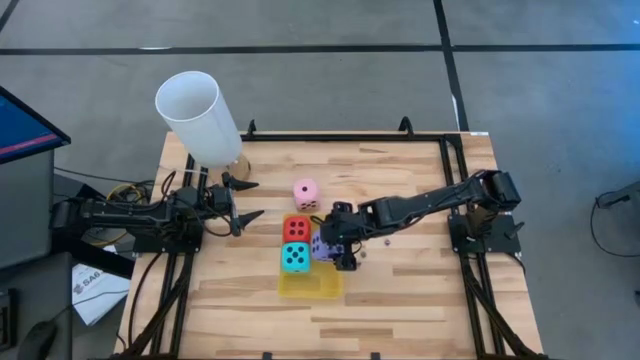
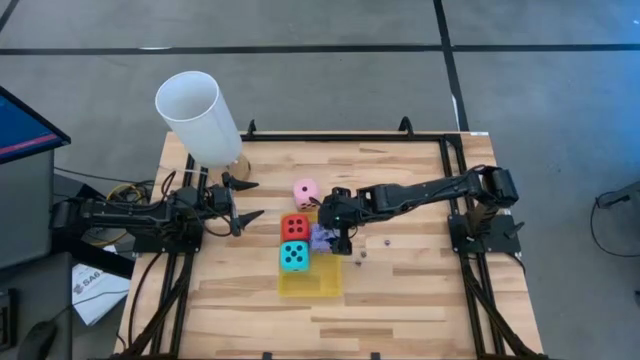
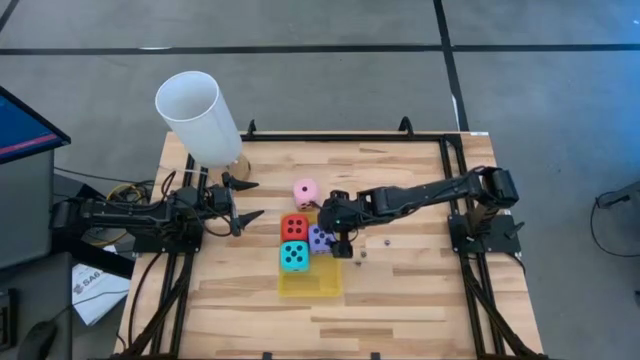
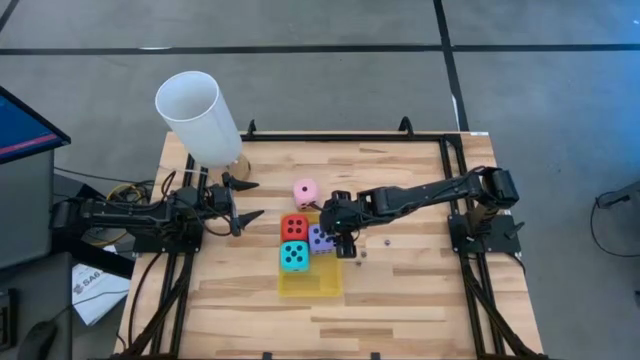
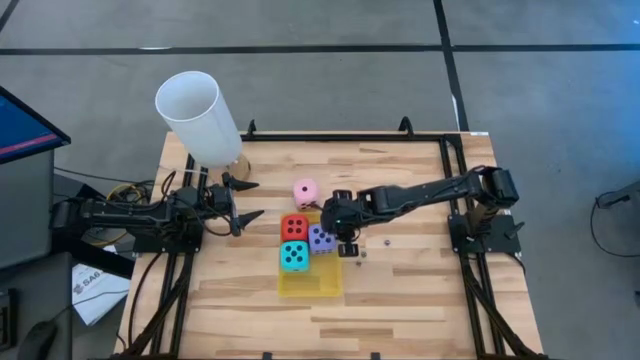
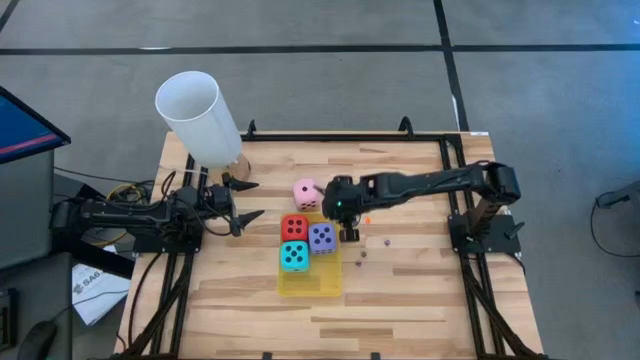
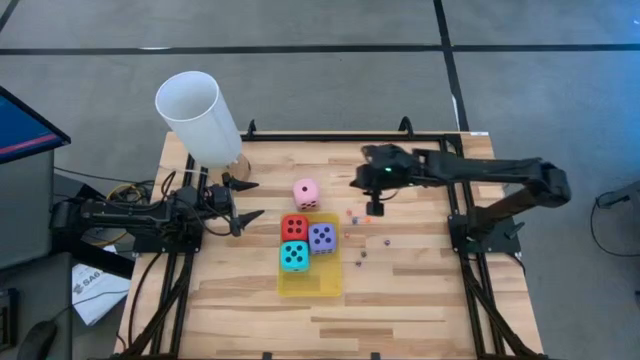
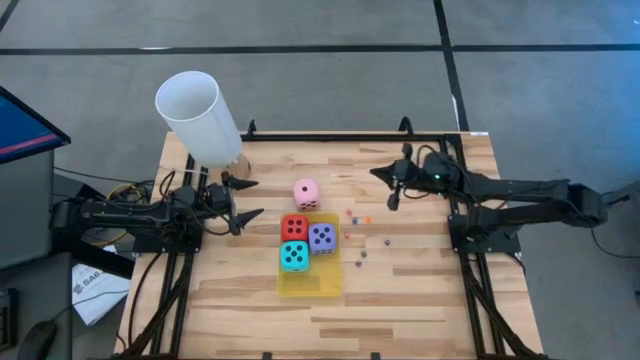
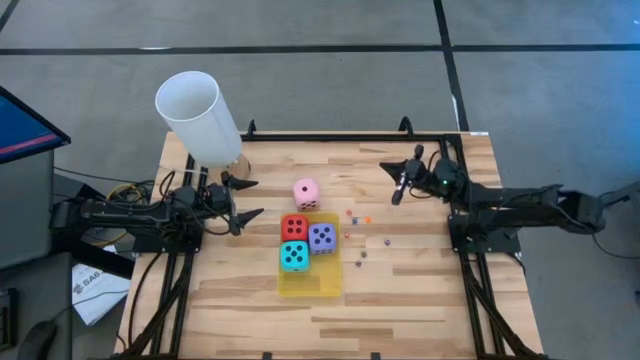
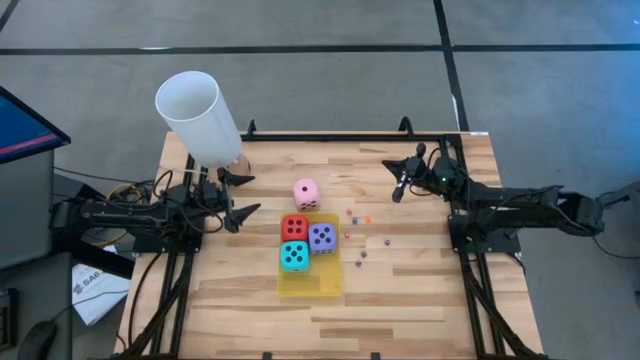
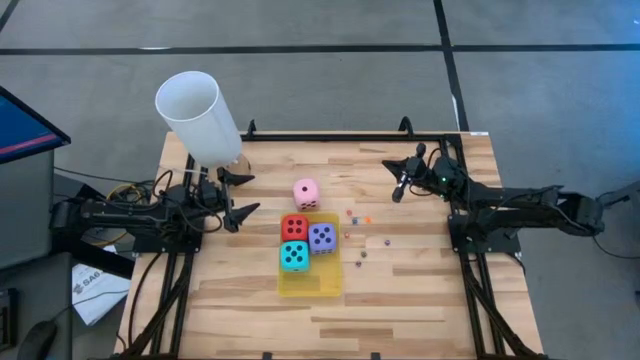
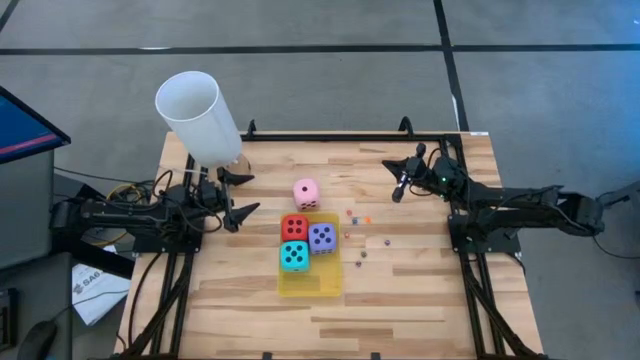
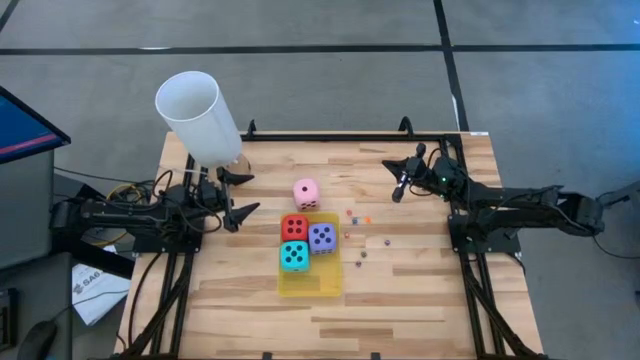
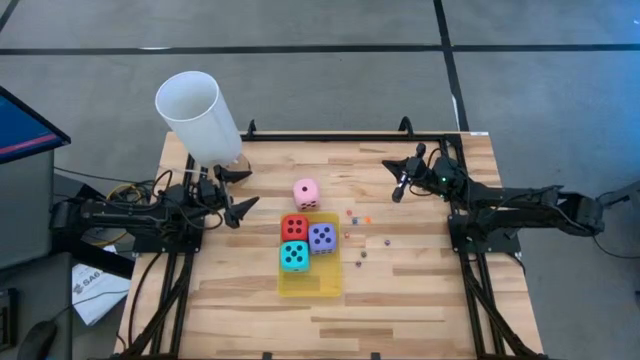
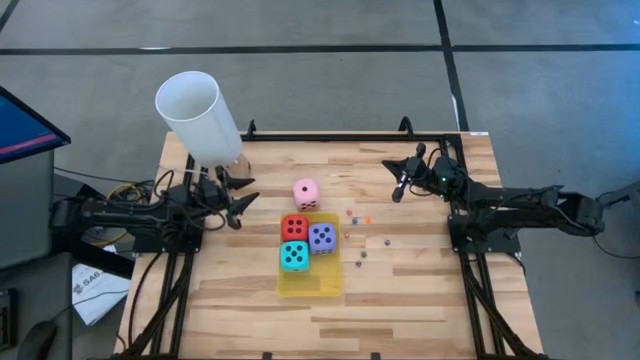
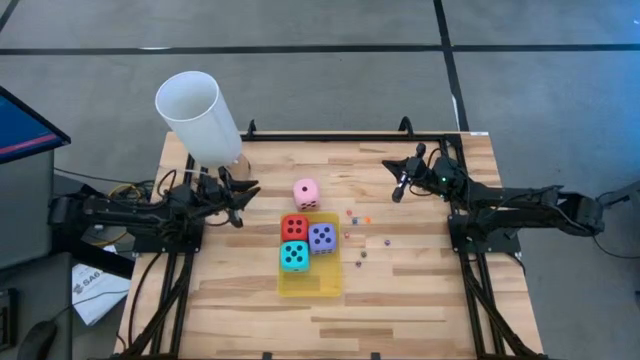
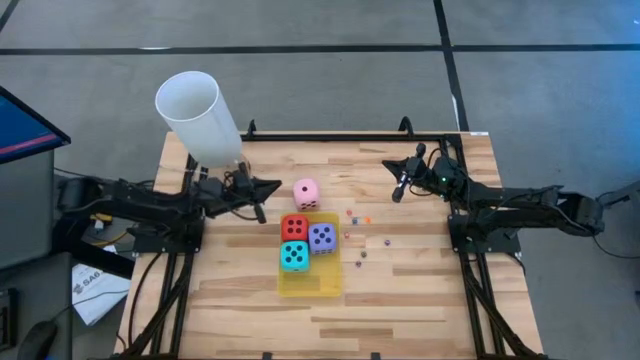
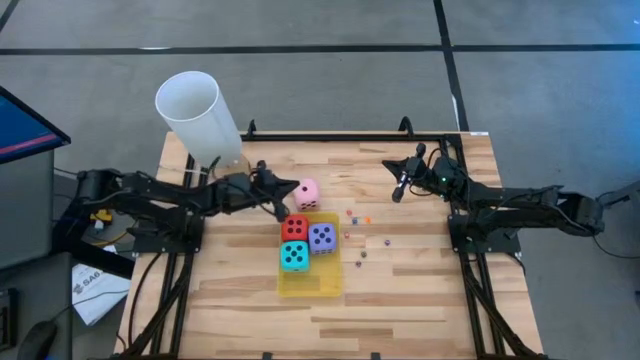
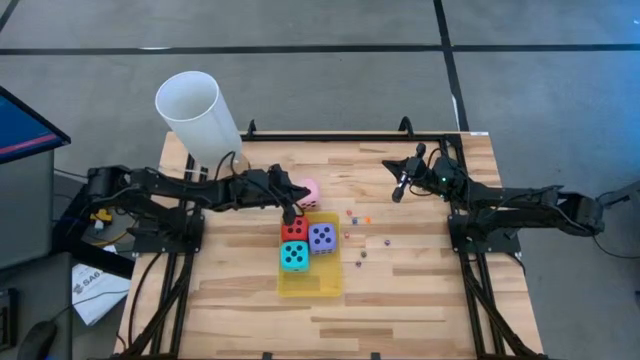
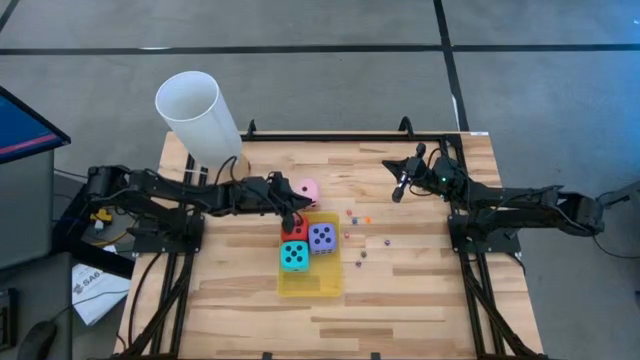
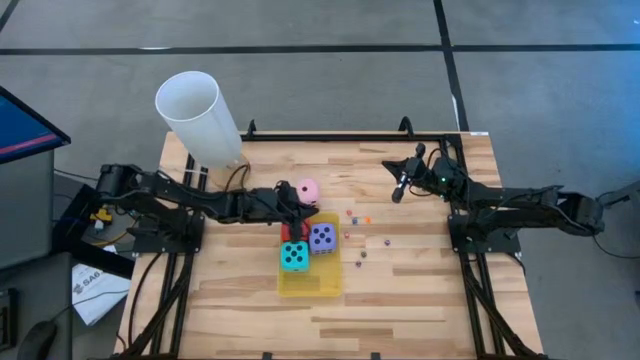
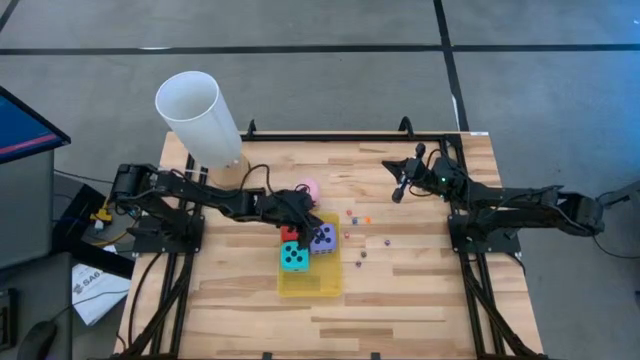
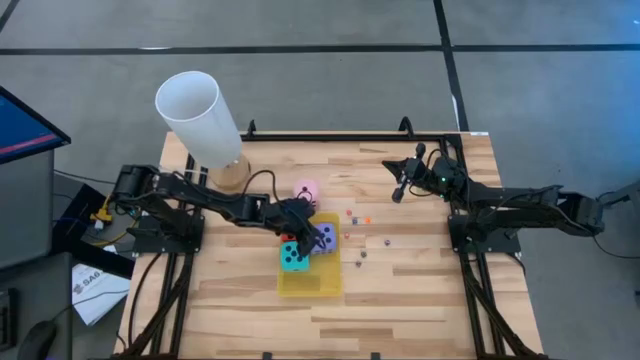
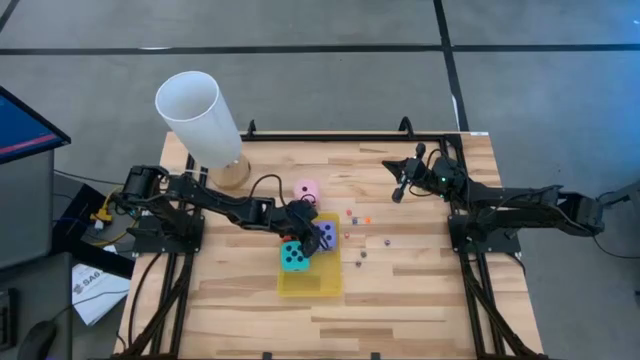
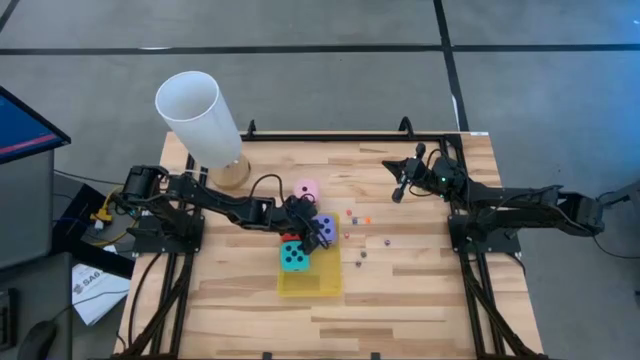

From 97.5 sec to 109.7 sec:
Task: Pick & Place Dice
Put the violet die into the yellow bin
